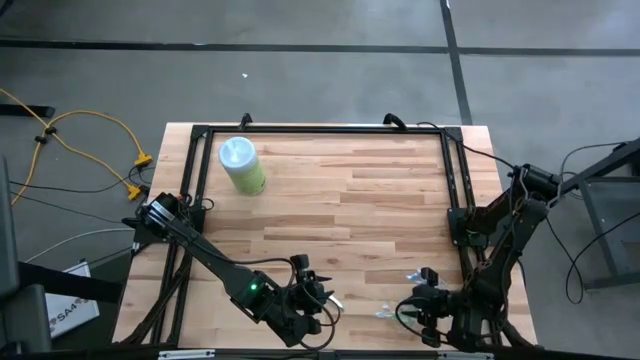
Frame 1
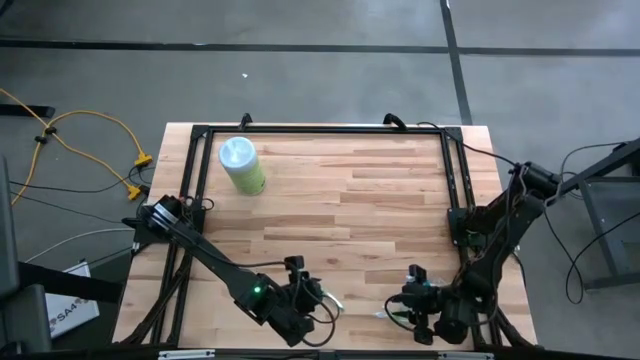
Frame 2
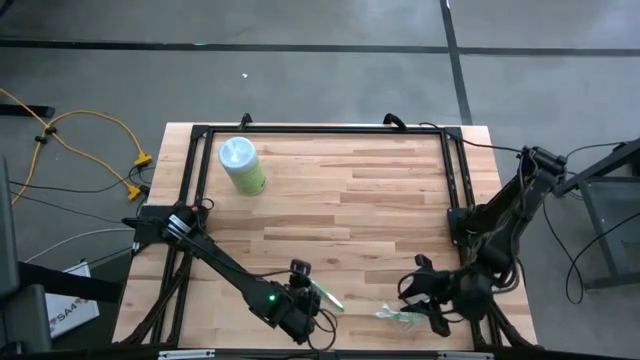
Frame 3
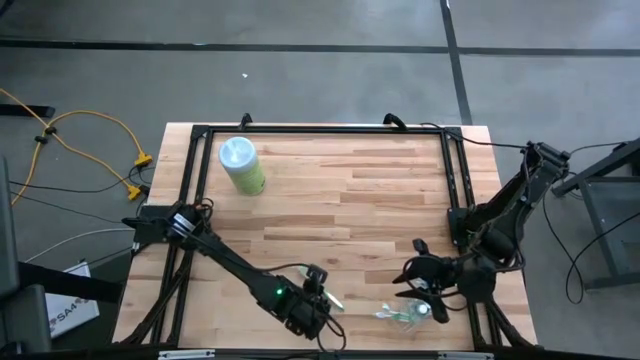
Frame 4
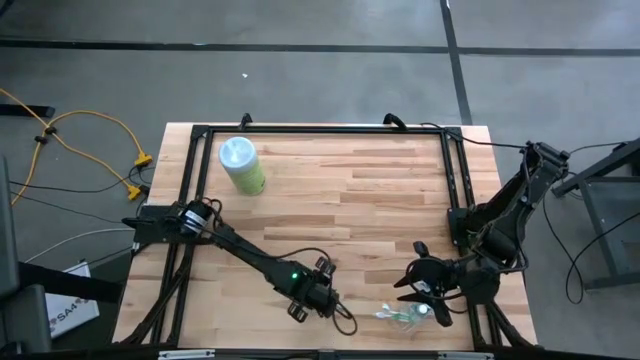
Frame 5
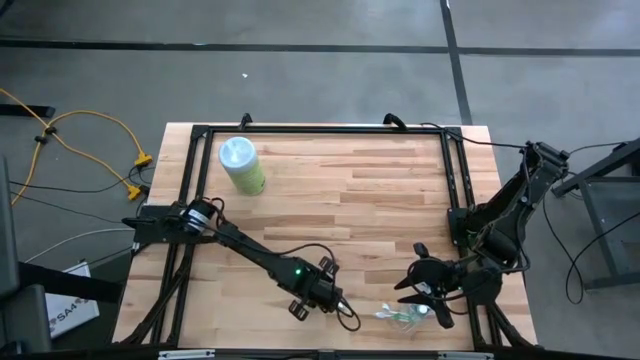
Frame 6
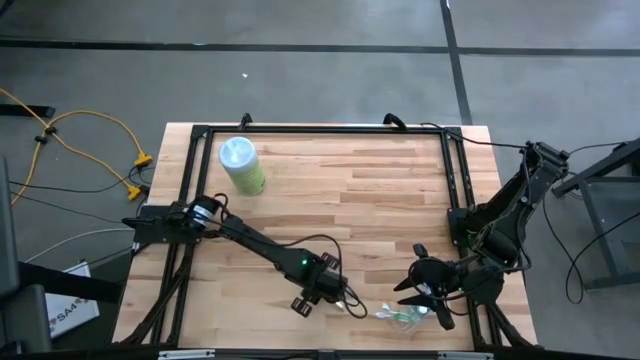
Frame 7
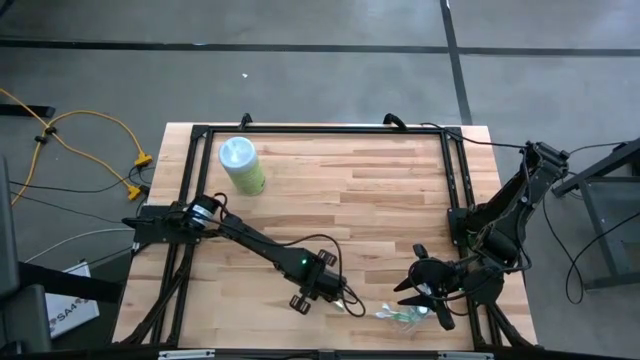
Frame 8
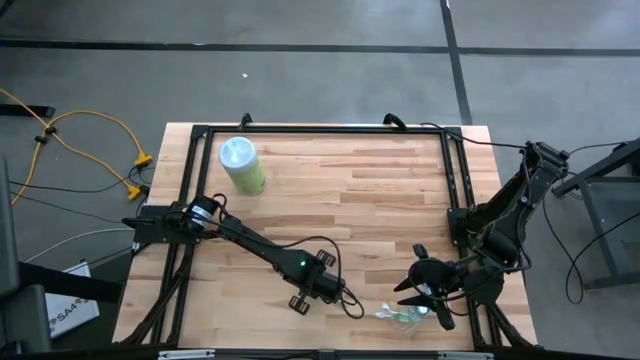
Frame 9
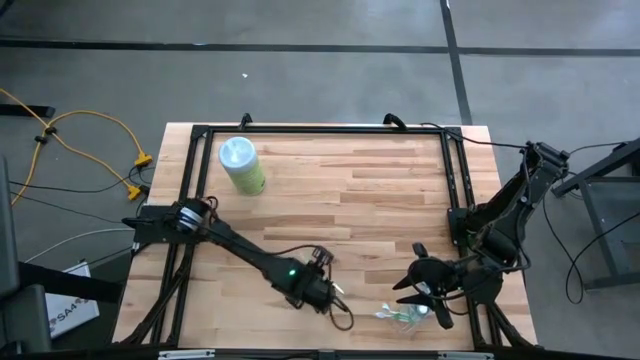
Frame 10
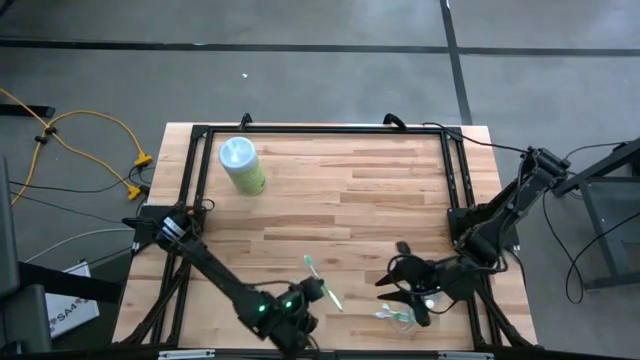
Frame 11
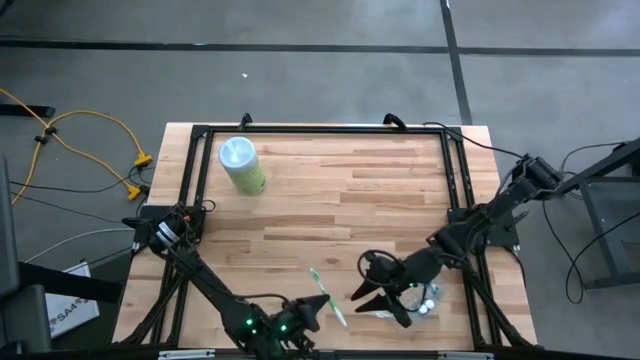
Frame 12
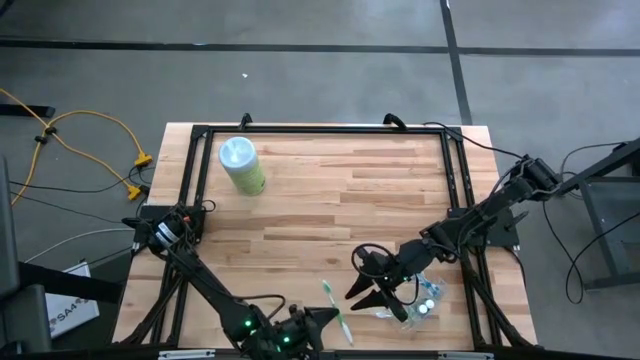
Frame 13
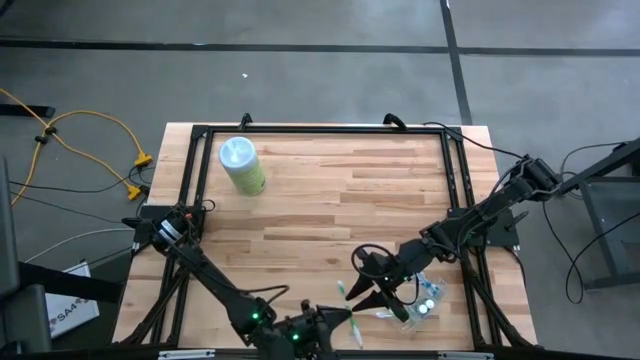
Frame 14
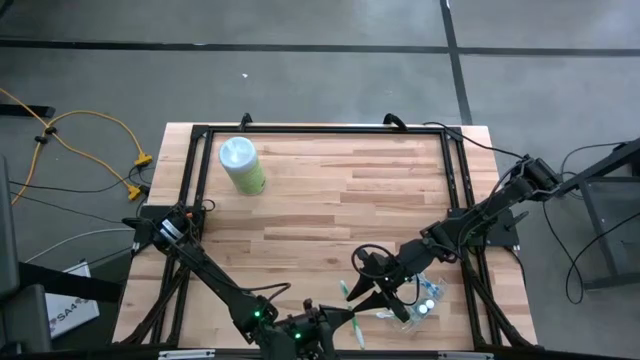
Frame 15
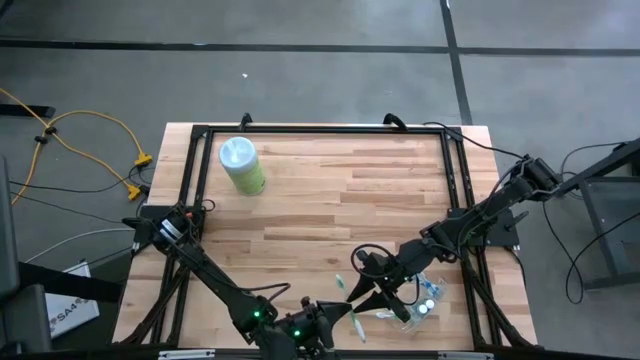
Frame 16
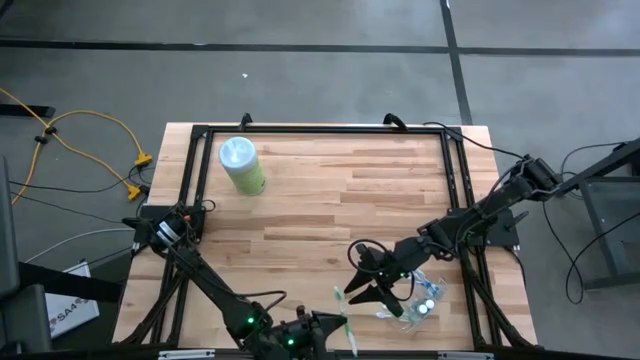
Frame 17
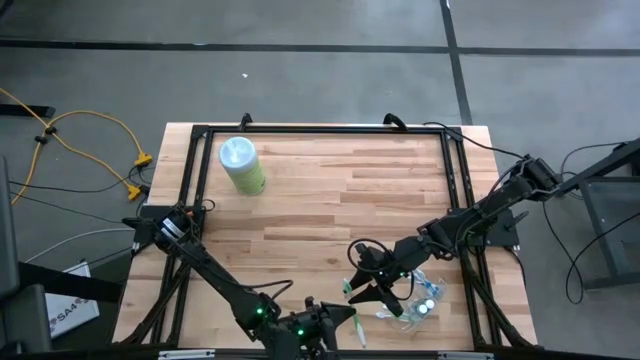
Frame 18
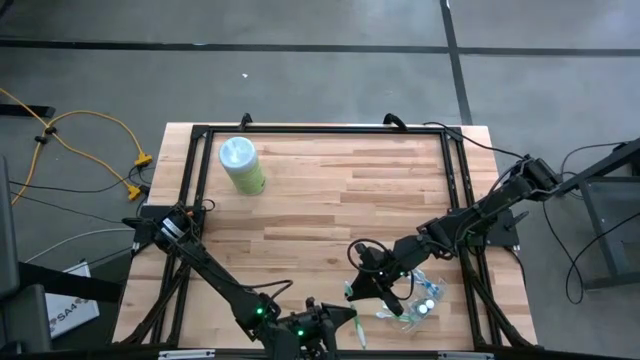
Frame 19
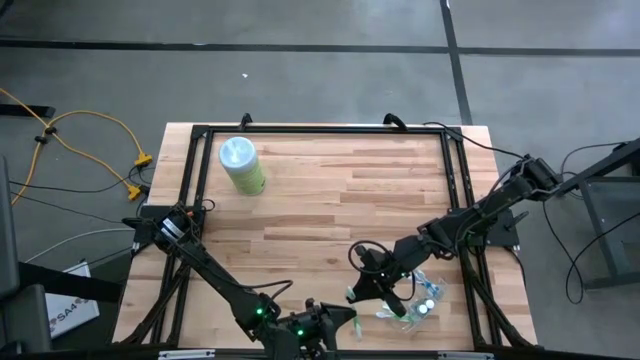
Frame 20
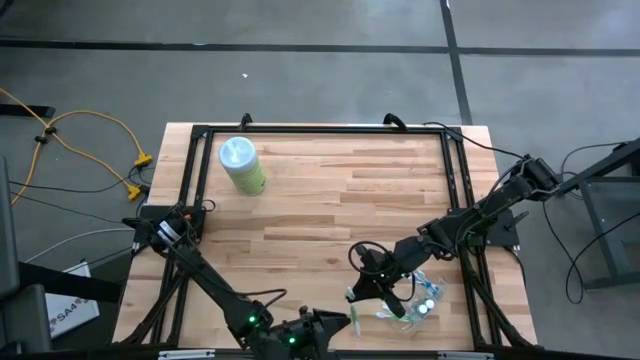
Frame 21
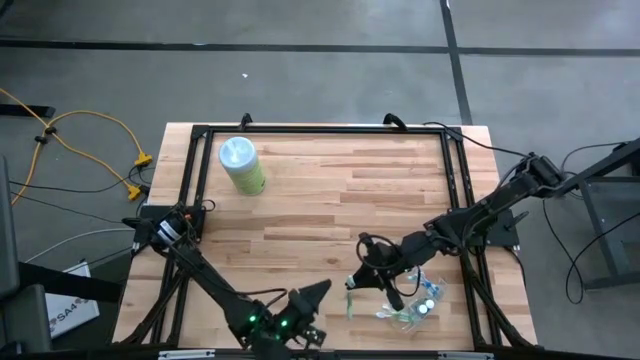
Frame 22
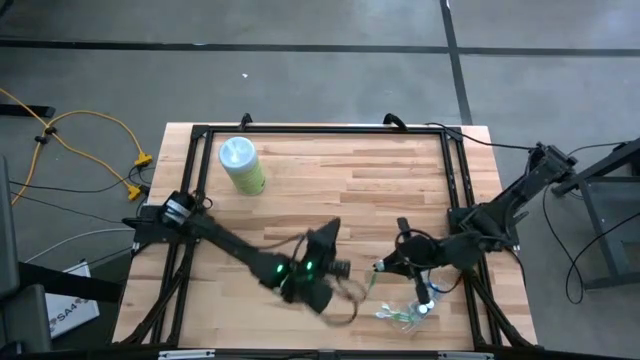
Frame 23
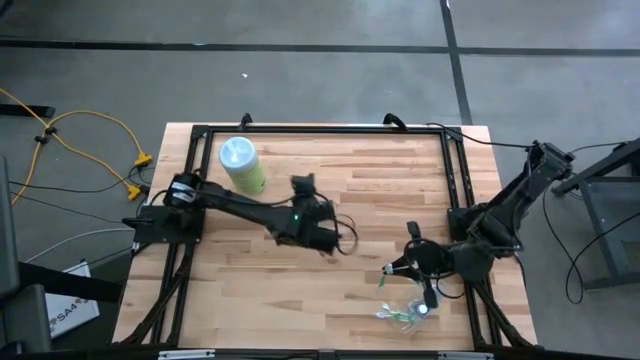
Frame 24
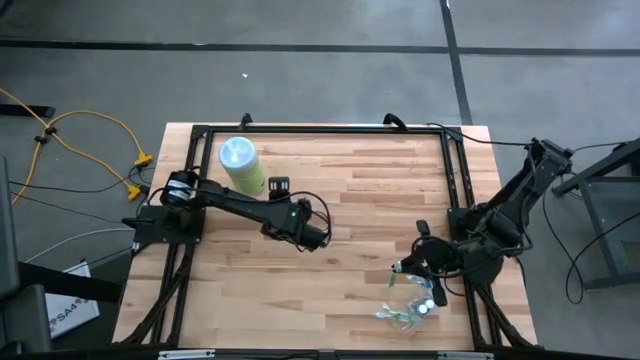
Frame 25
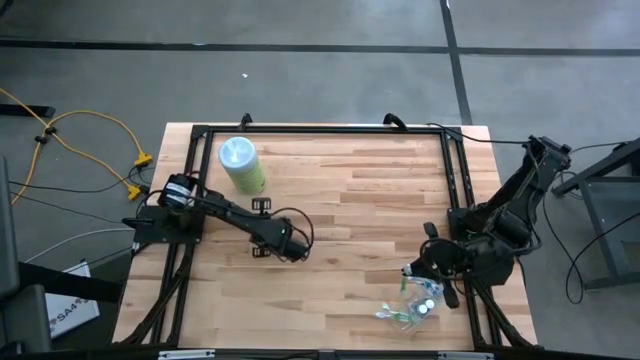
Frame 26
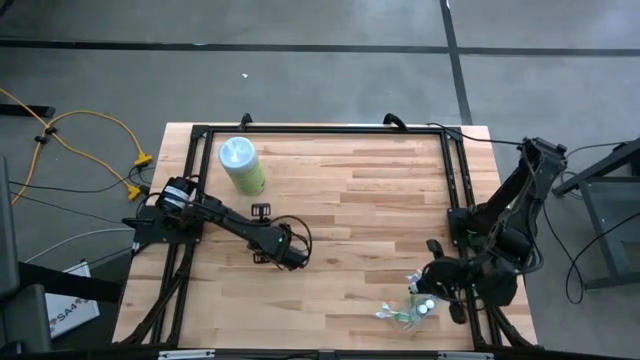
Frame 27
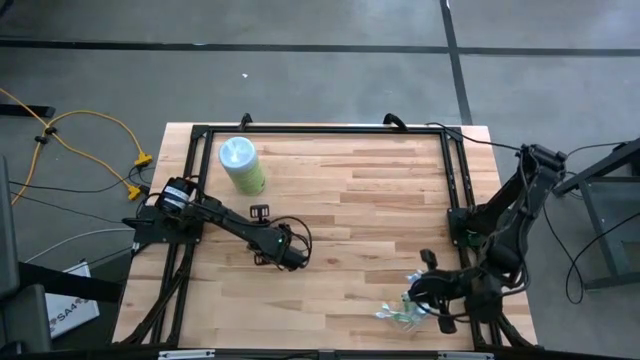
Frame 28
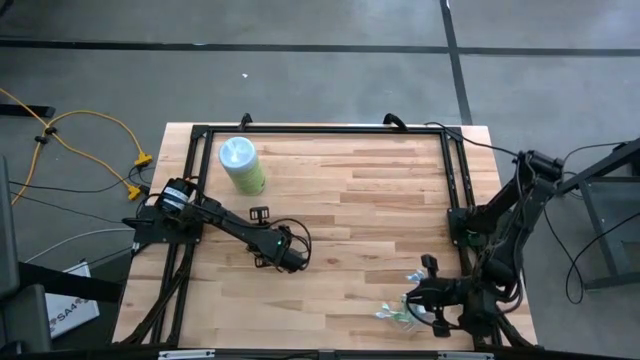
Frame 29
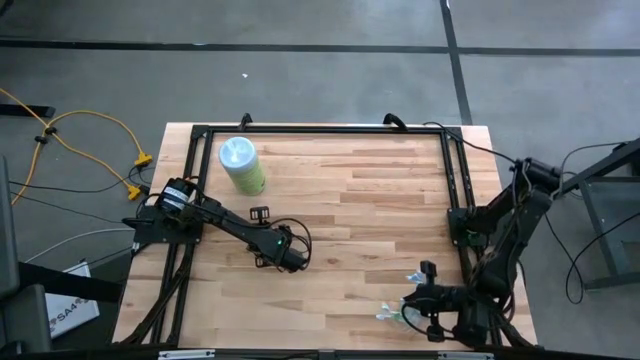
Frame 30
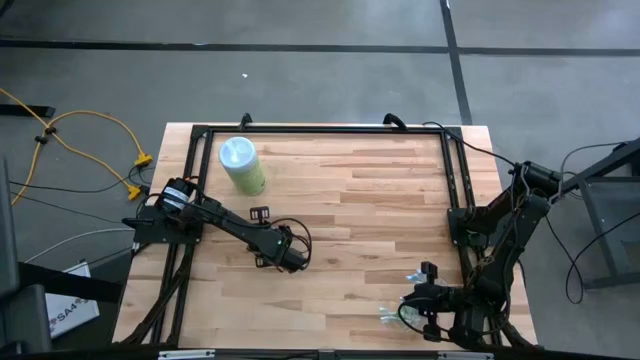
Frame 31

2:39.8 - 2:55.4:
Task: Pick & Place toothbrushing station
Put the green toothbrush into the left section of the transparent organizer

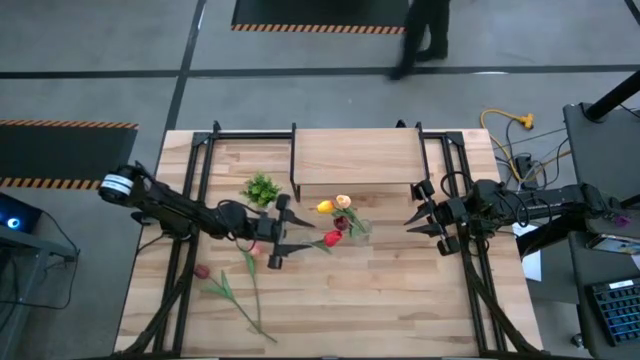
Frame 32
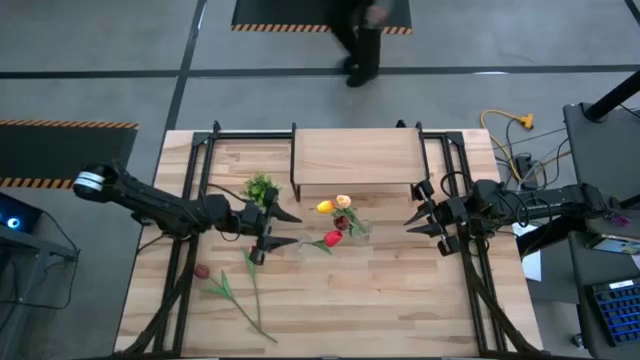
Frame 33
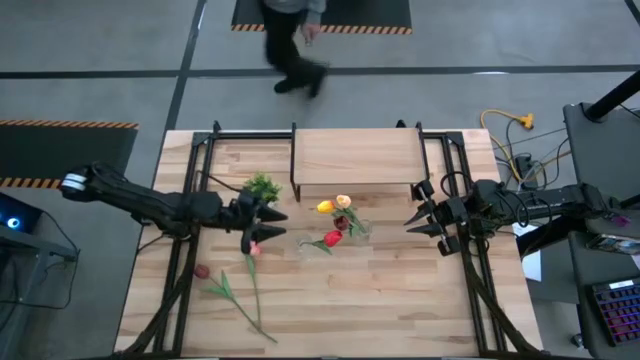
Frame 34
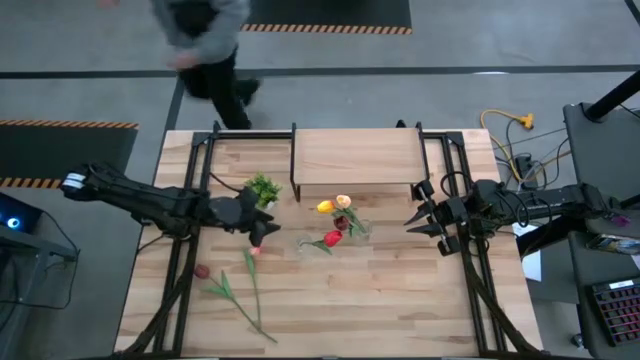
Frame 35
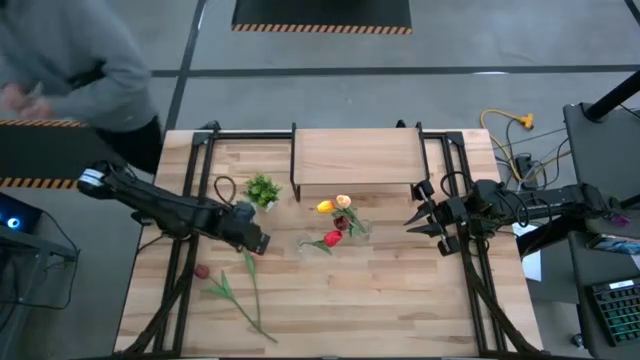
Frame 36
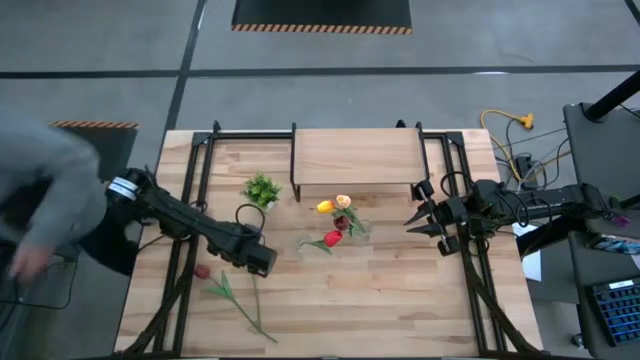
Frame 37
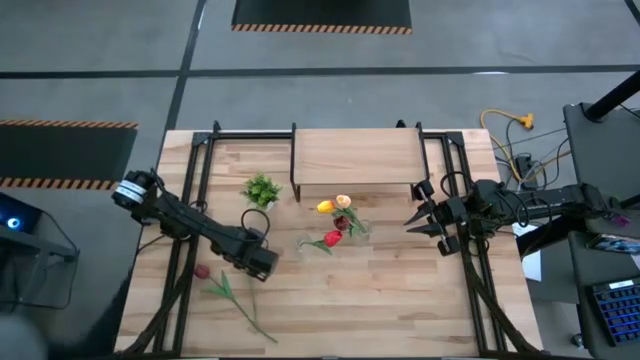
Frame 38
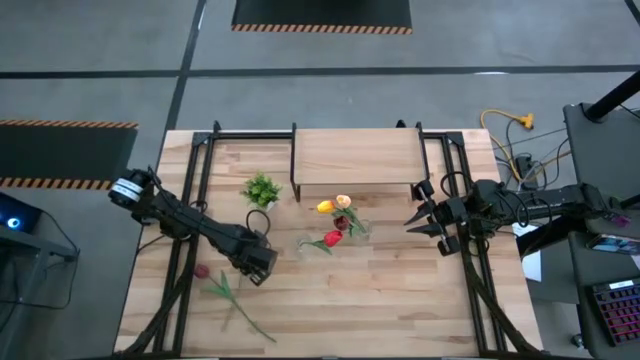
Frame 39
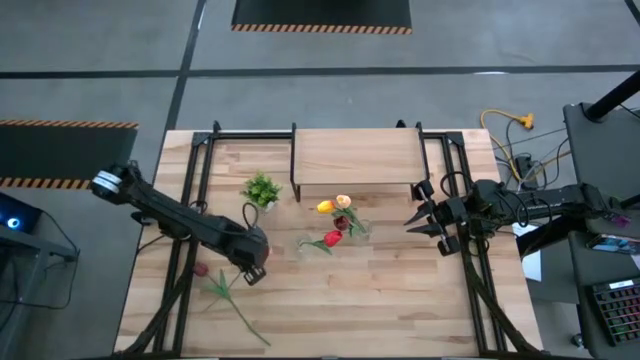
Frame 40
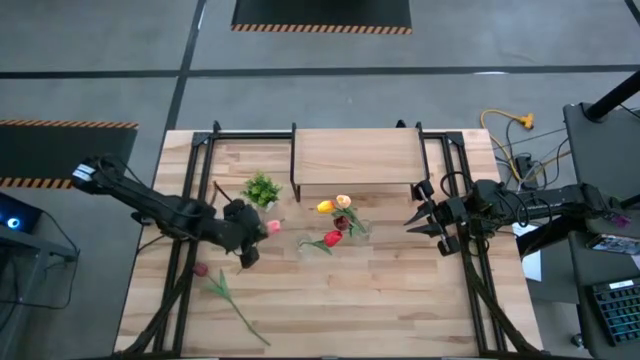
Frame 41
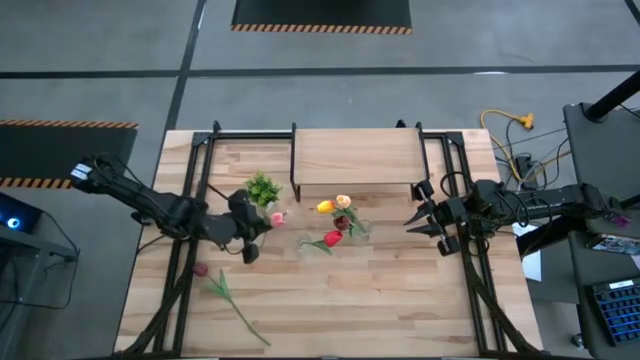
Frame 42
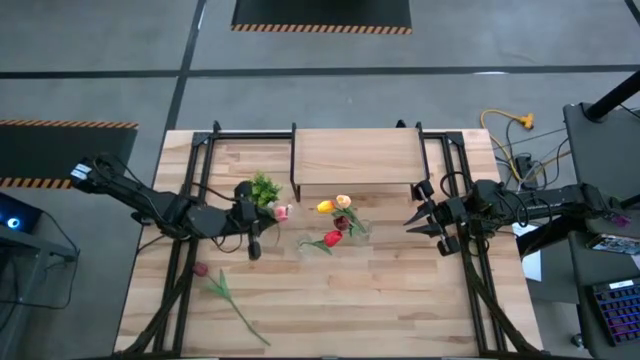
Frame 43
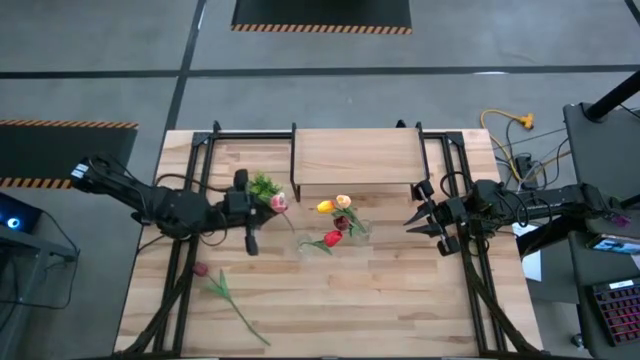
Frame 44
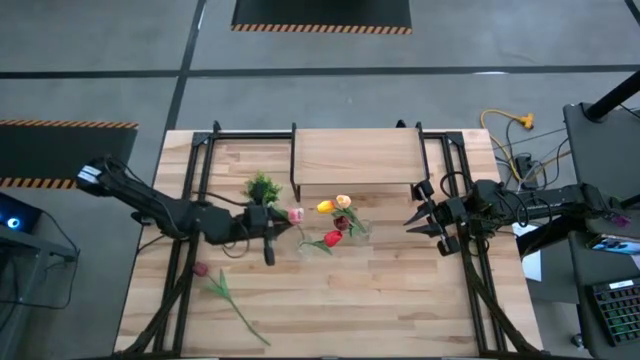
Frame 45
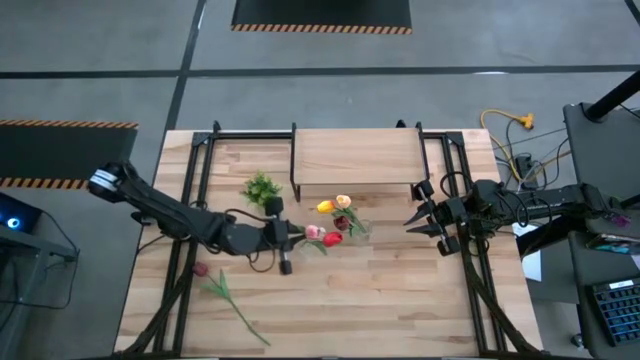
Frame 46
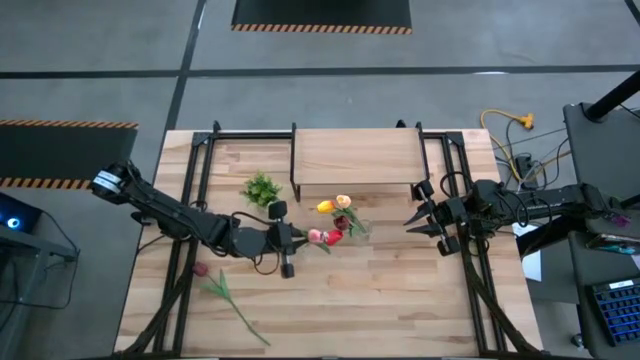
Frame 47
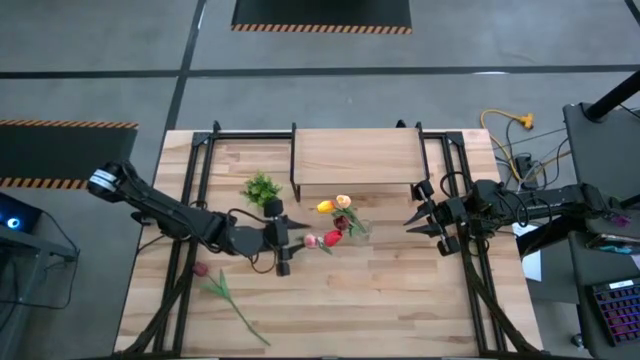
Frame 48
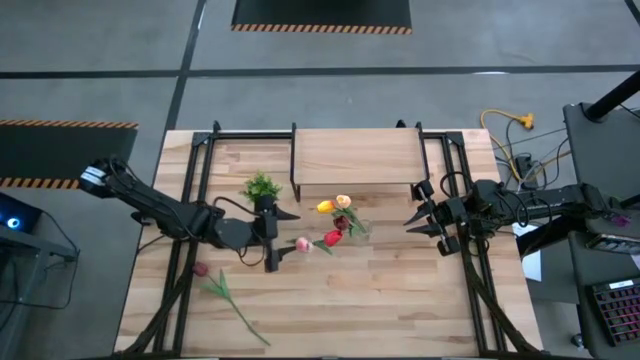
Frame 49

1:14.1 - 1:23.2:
Task: Pick and place flowers into a vace then onto a shelf
Put the pink tulip into the left transparent vase
